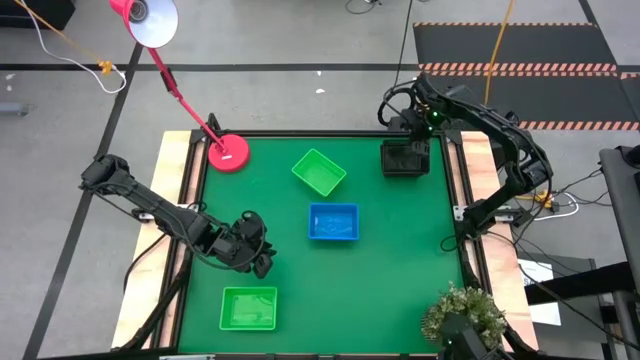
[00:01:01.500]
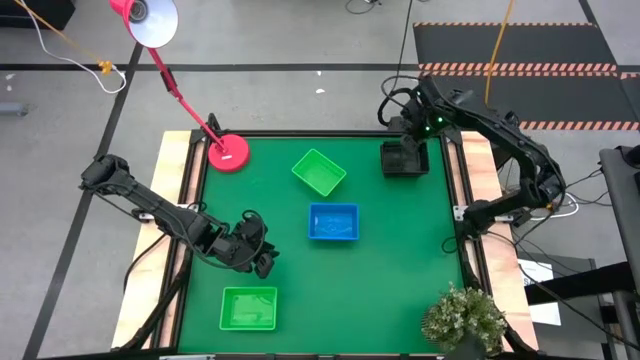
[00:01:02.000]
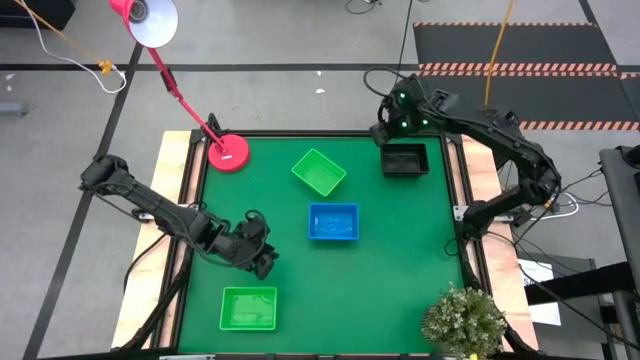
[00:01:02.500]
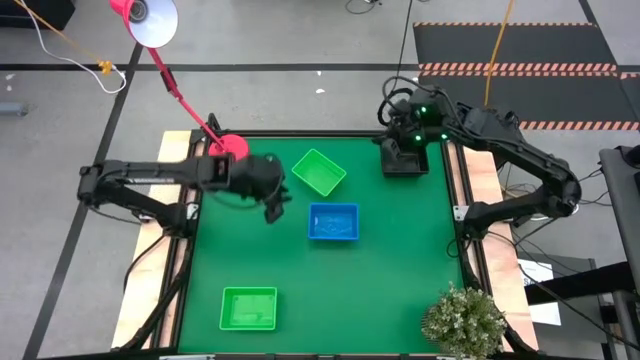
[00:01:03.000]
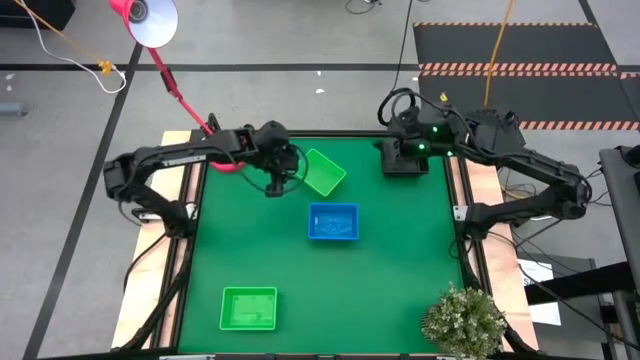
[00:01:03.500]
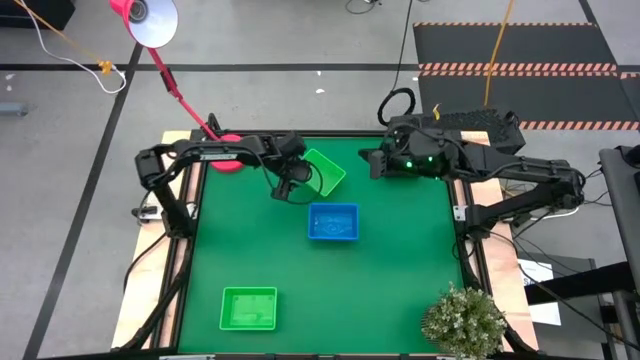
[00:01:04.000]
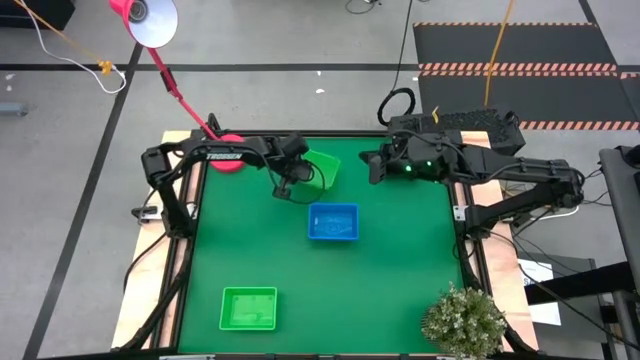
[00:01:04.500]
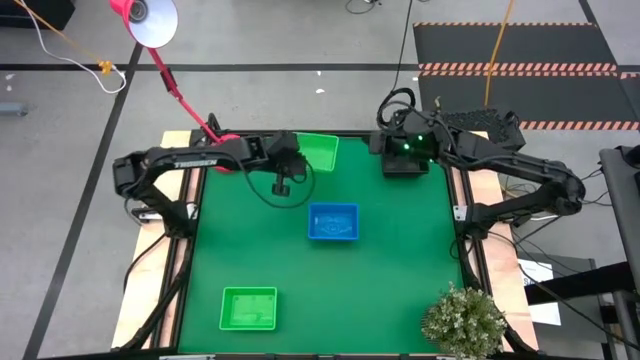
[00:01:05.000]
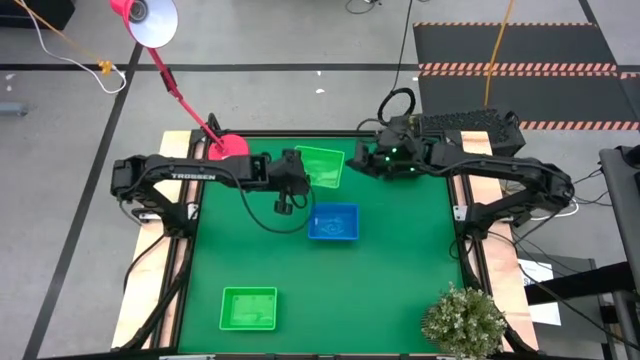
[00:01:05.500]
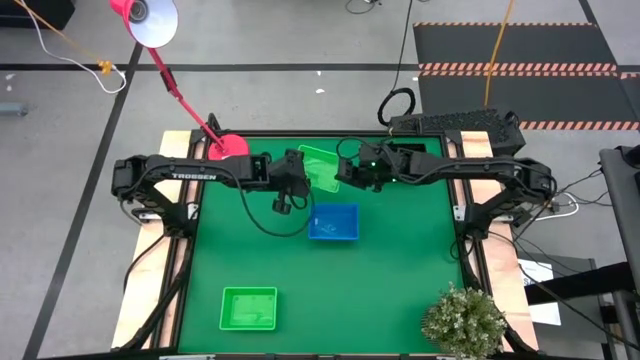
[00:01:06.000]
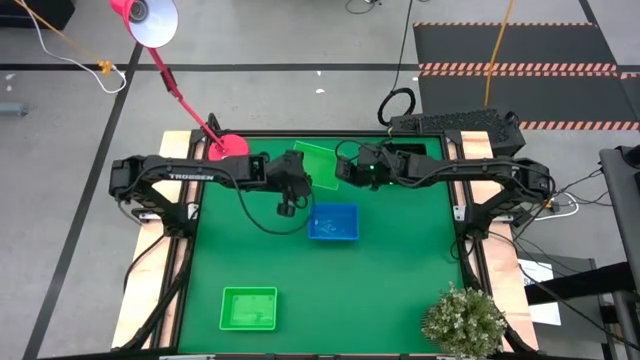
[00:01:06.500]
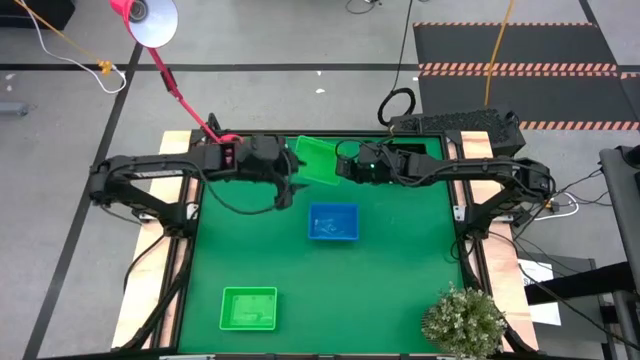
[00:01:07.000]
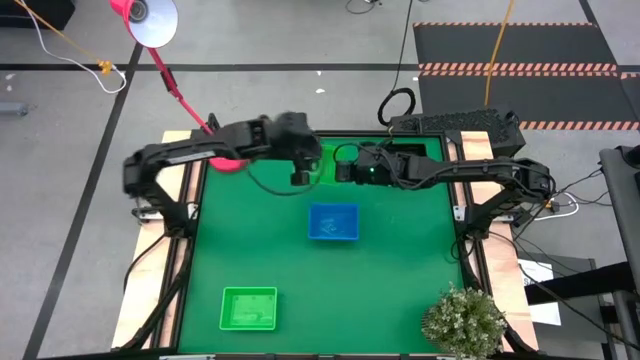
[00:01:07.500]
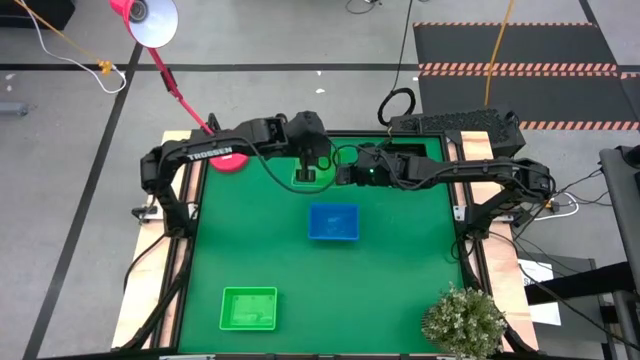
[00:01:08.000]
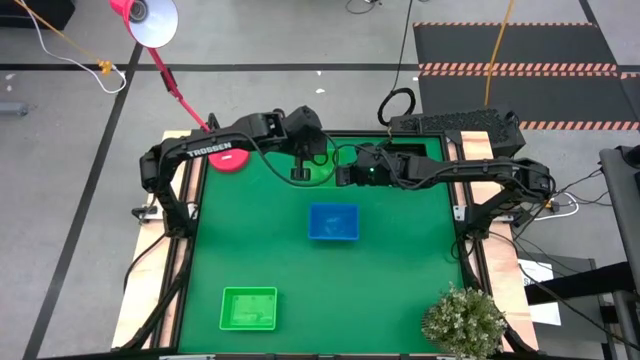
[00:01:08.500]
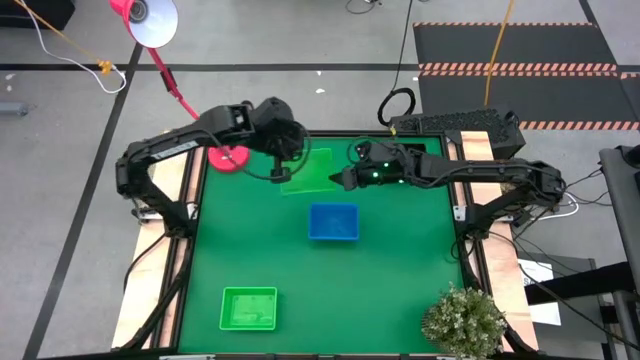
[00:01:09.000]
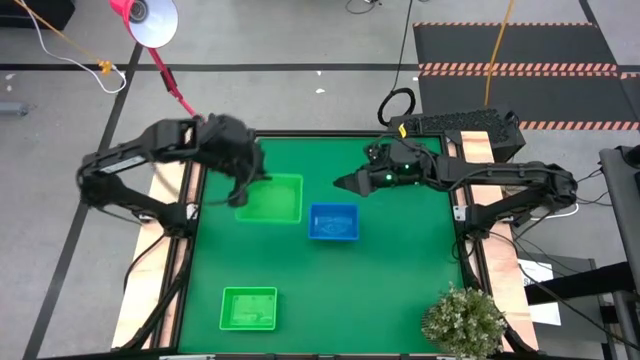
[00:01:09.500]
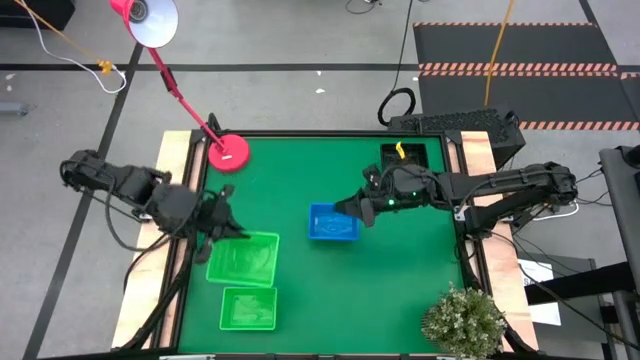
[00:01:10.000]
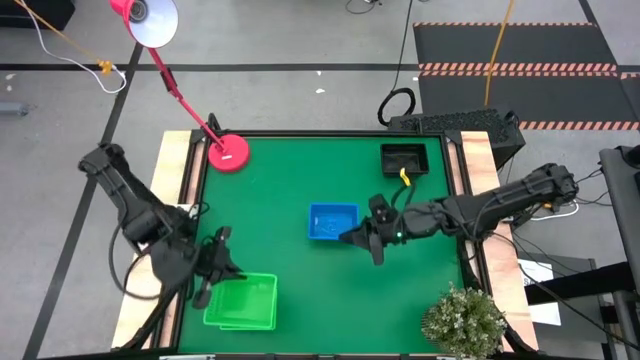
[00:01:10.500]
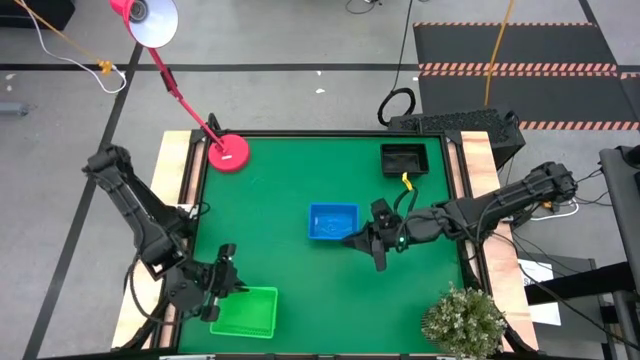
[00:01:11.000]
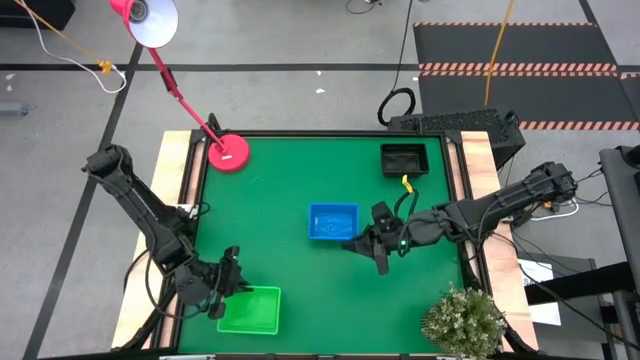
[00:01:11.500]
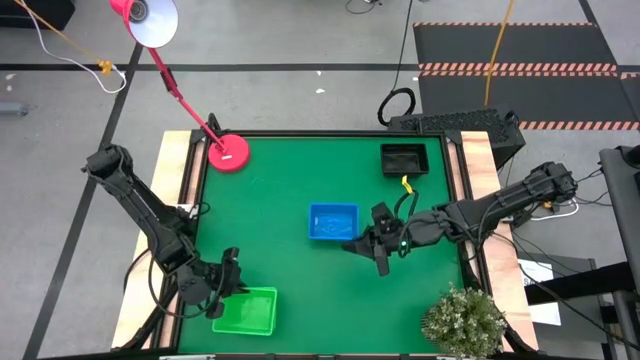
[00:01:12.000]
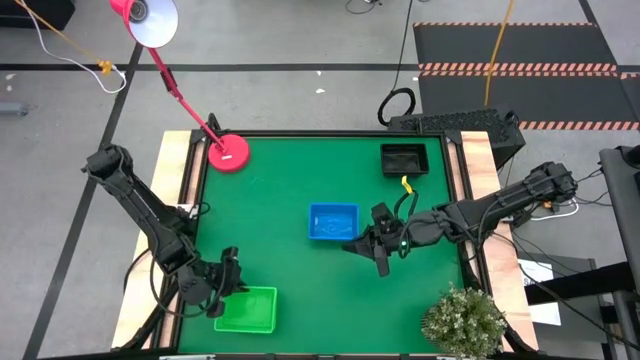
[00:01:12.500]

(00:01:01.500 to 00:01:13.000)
Stack the top green bin on the green bins

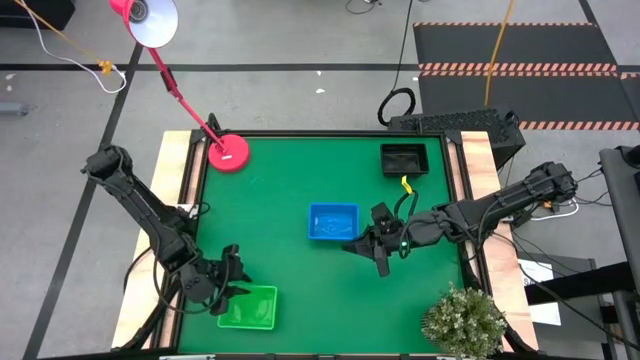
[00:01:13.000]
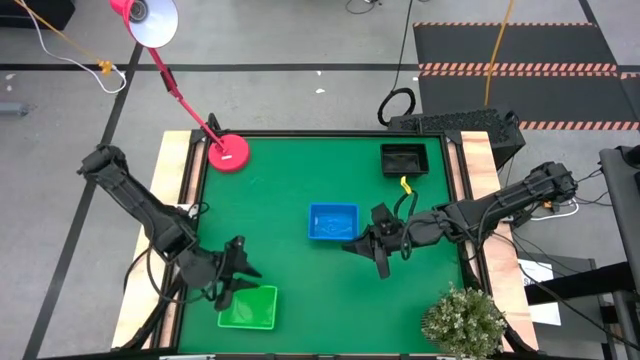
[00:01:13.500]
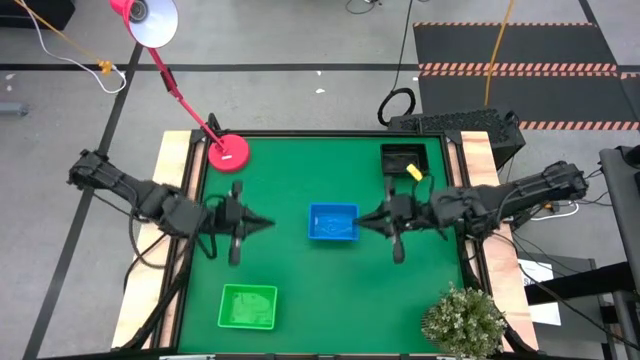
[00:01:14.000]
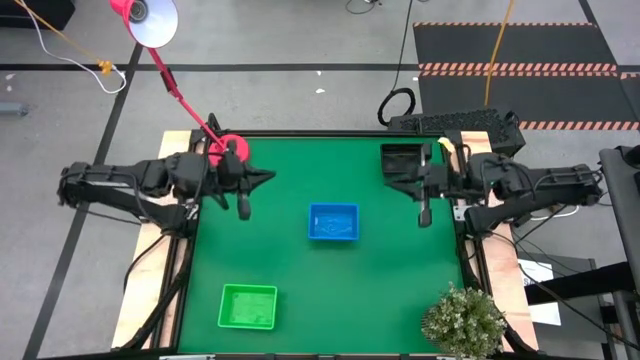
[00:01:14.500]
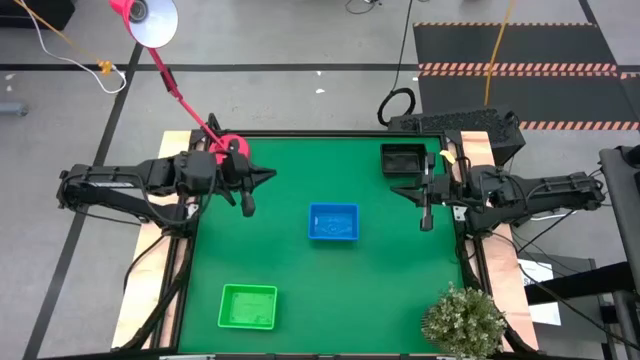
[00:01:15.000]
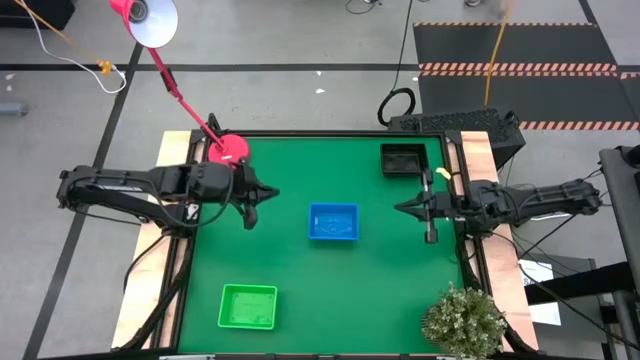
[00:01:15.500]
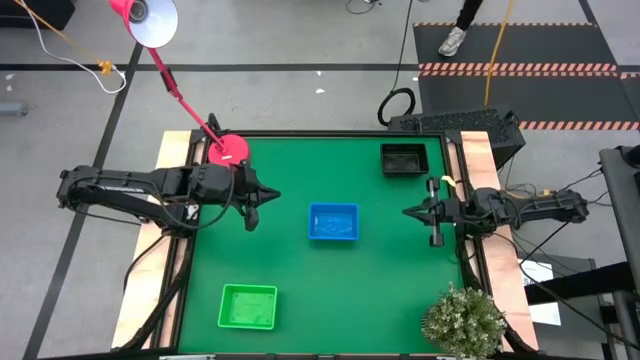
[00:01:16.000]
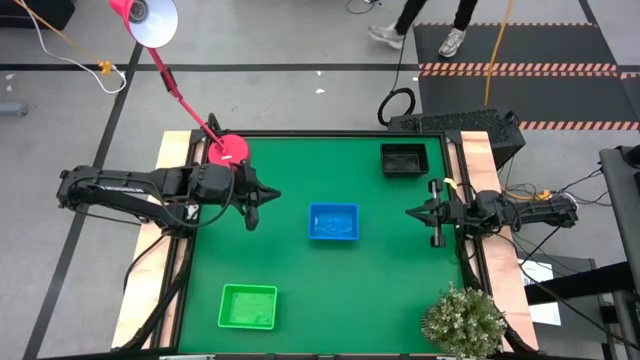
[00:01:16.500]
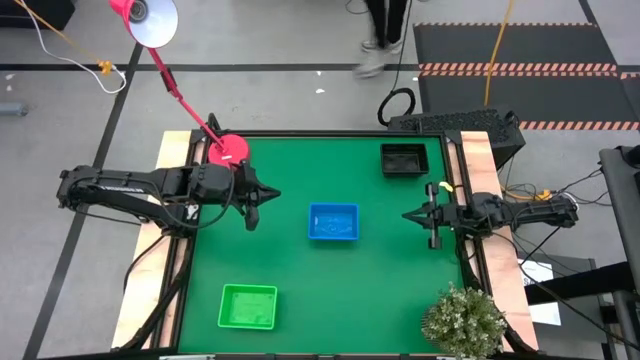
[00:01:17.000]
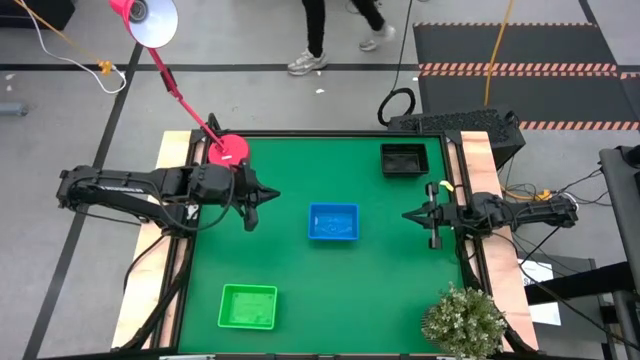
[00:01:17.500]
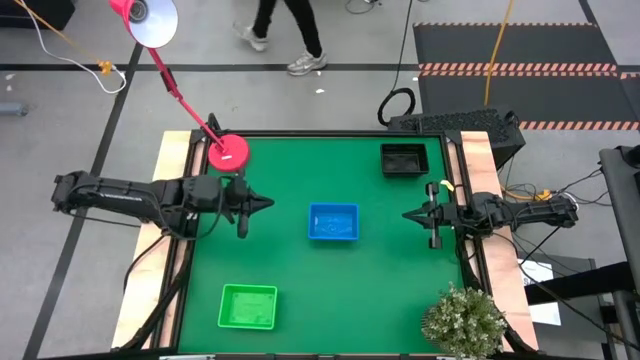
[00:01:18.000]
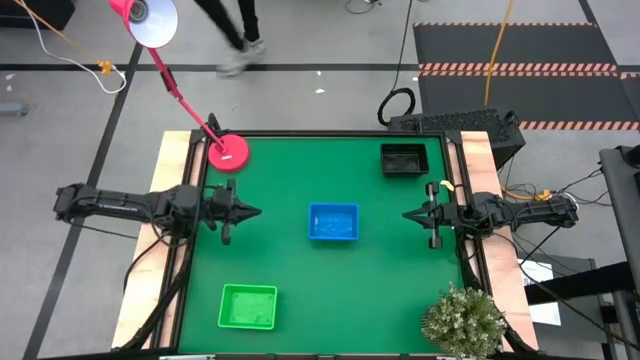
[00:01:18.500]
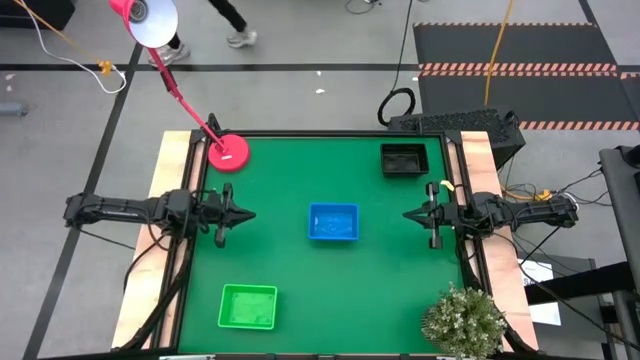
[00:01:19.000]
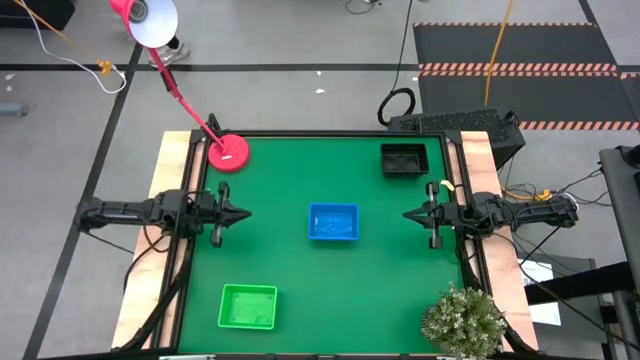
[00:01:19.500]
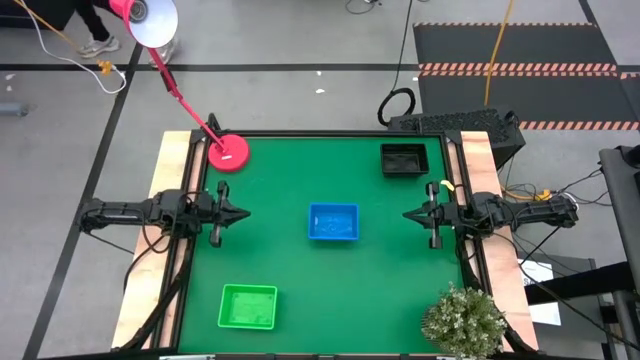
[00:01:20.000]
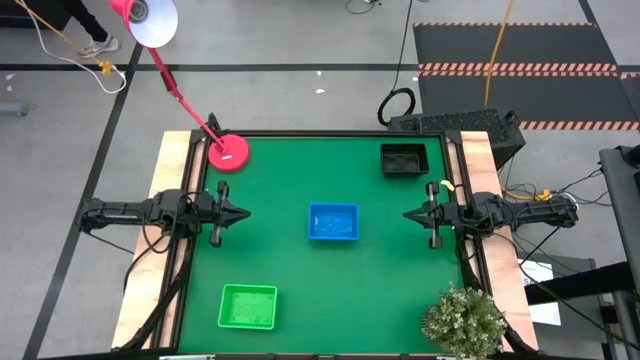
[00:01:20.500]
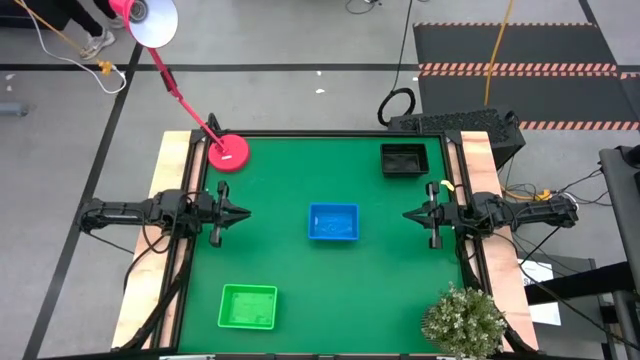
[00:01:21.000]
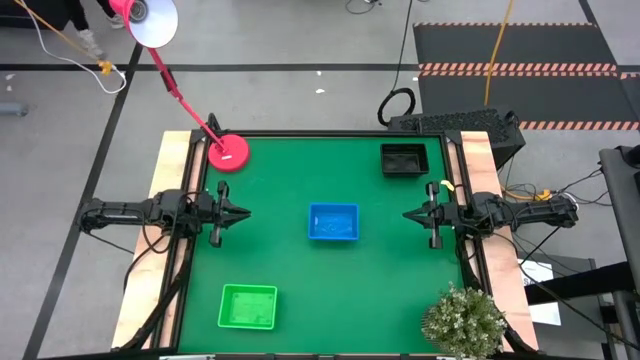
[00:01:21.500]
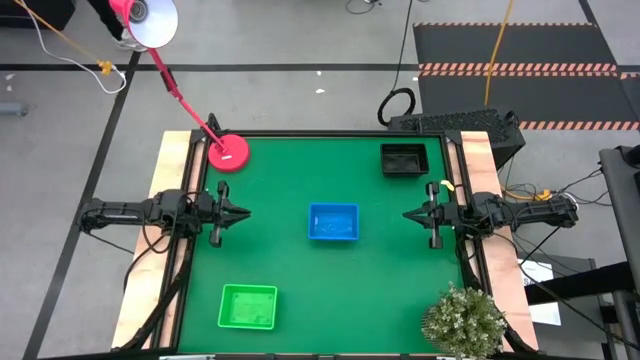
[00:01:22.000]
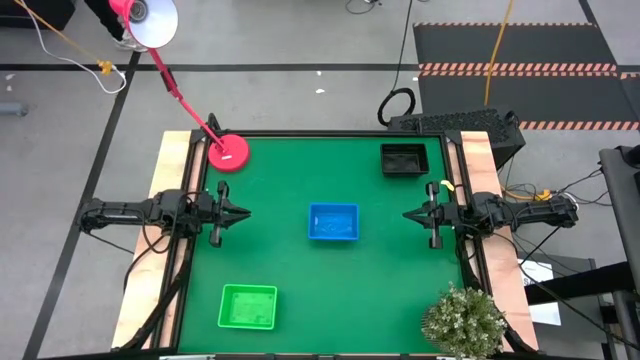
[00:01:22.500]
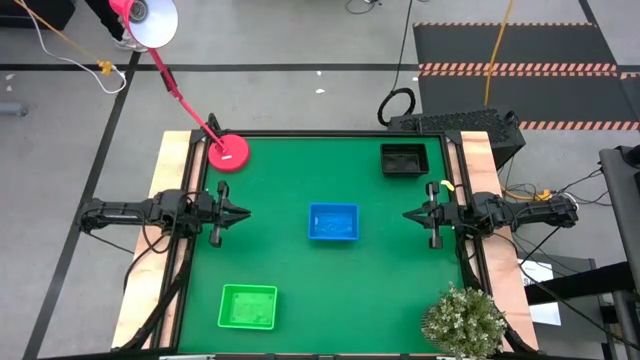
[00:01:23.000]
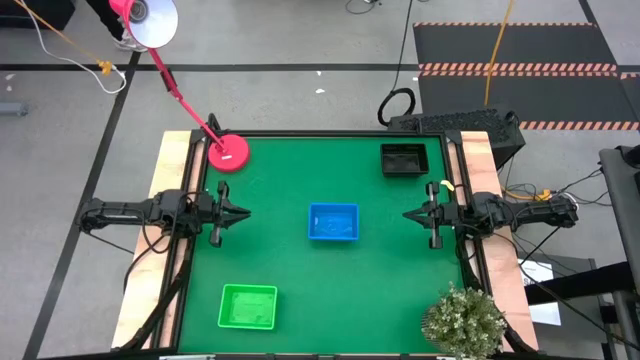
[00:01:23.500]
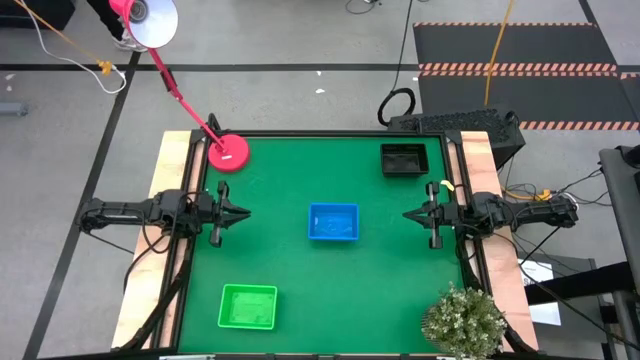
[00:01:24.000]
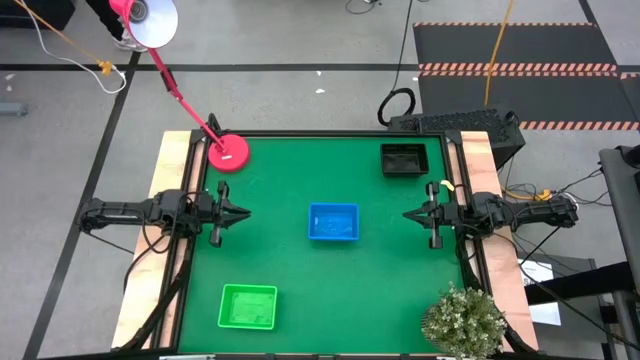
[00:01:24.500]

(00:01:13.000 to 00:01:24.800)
Return to Home Position
